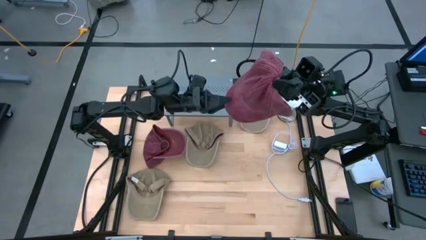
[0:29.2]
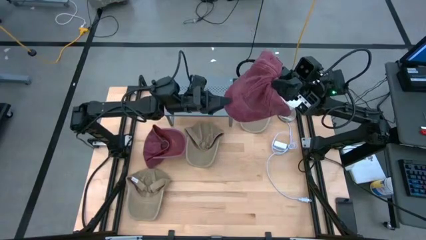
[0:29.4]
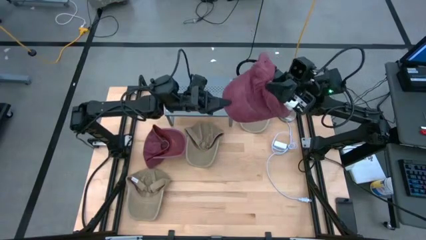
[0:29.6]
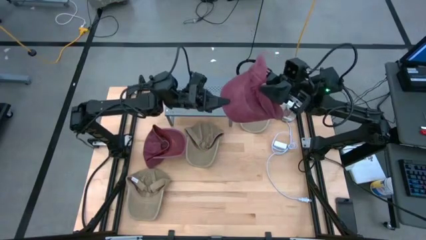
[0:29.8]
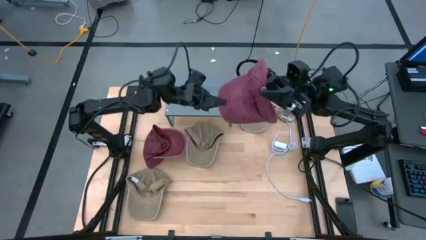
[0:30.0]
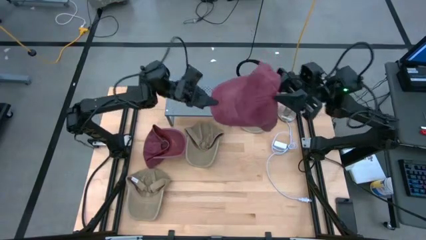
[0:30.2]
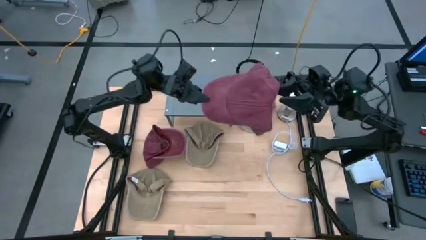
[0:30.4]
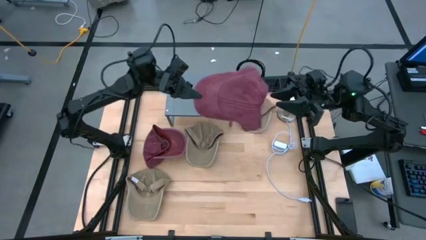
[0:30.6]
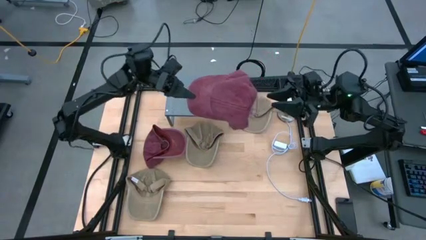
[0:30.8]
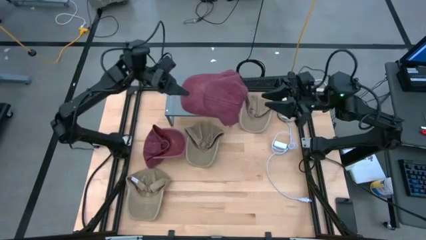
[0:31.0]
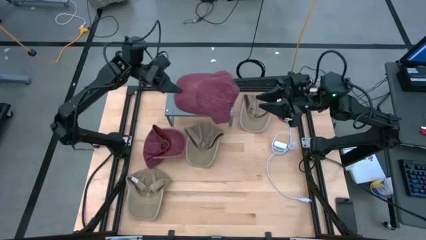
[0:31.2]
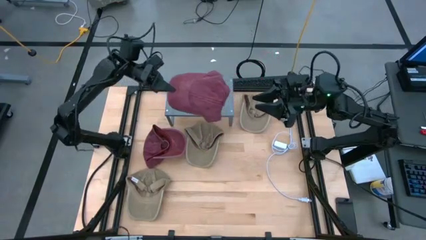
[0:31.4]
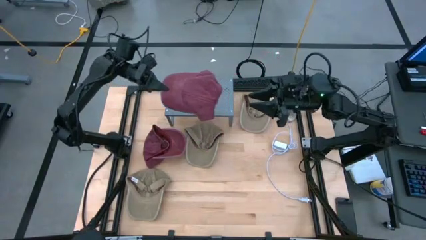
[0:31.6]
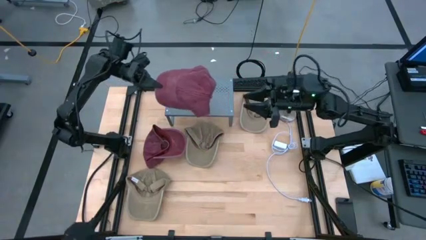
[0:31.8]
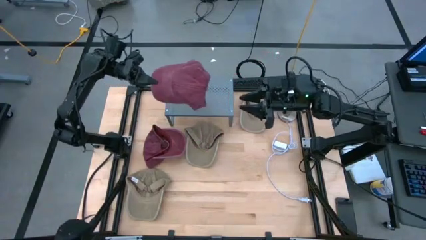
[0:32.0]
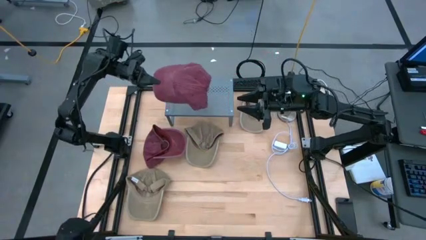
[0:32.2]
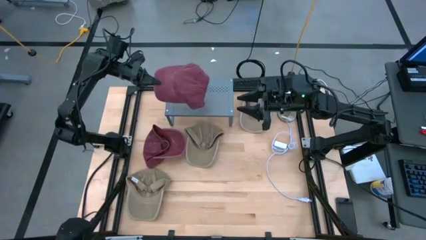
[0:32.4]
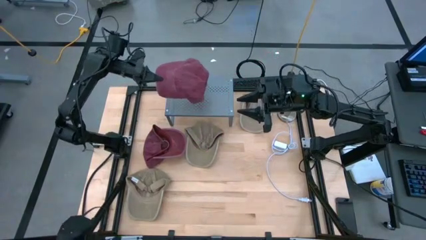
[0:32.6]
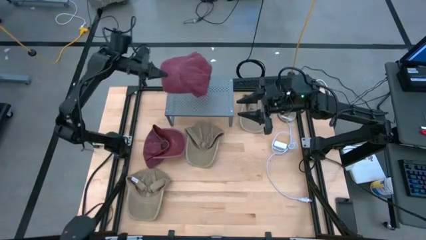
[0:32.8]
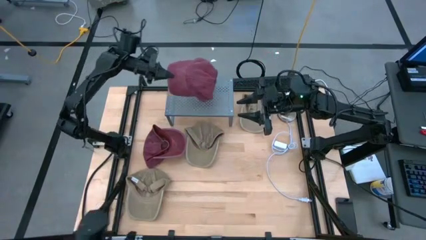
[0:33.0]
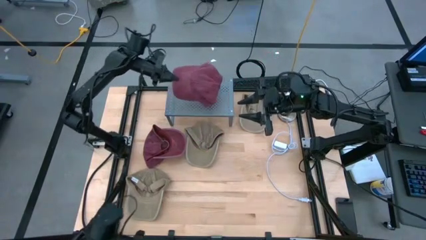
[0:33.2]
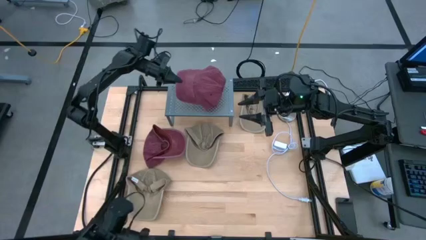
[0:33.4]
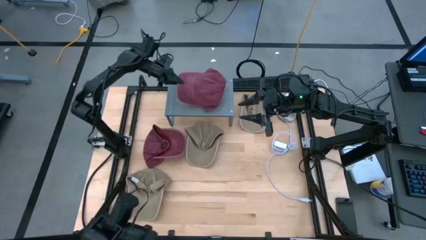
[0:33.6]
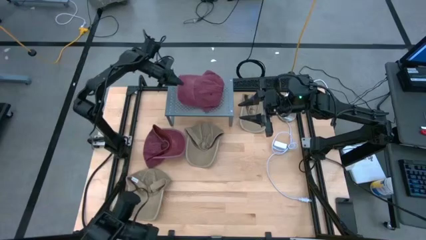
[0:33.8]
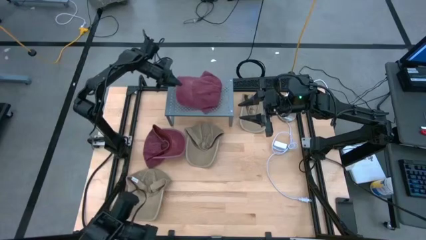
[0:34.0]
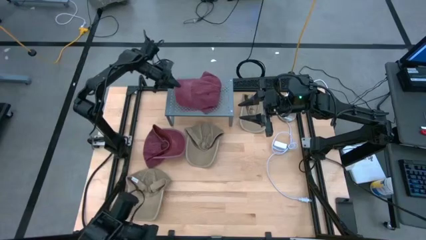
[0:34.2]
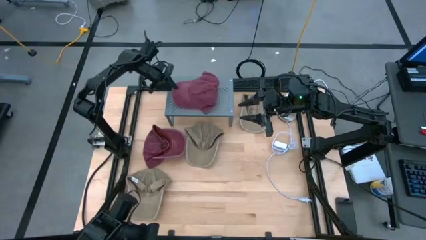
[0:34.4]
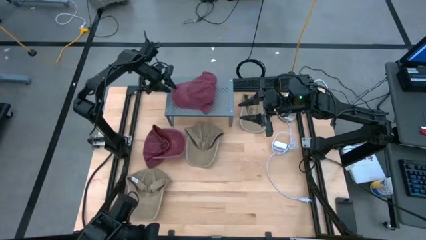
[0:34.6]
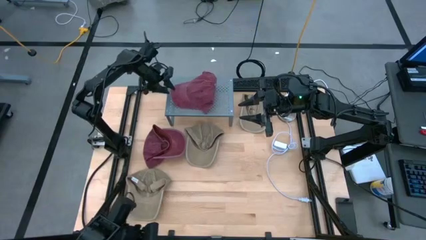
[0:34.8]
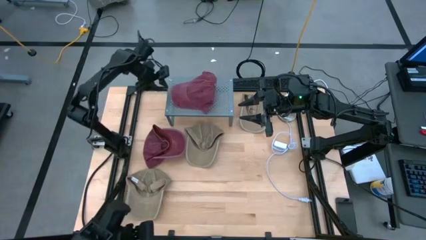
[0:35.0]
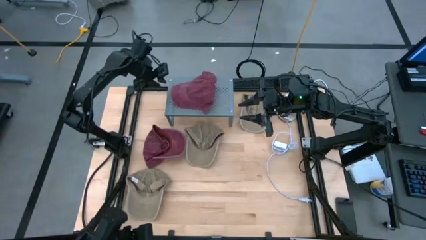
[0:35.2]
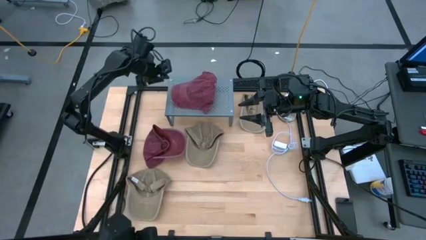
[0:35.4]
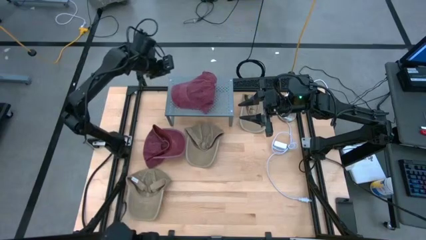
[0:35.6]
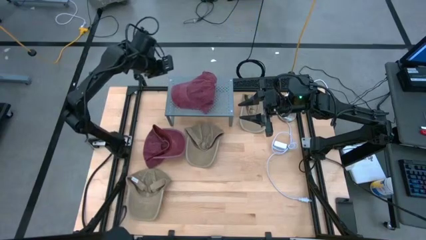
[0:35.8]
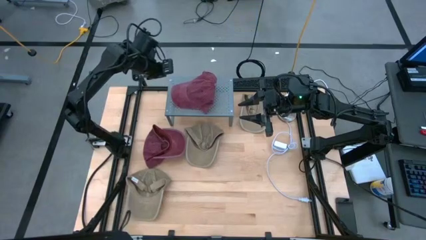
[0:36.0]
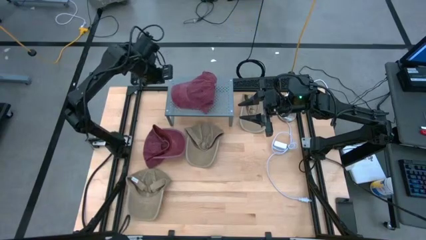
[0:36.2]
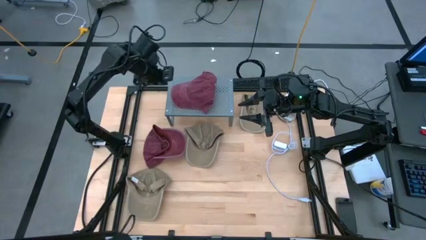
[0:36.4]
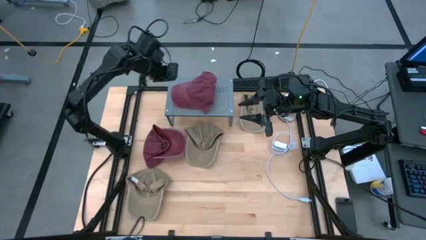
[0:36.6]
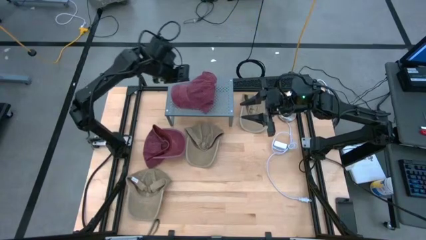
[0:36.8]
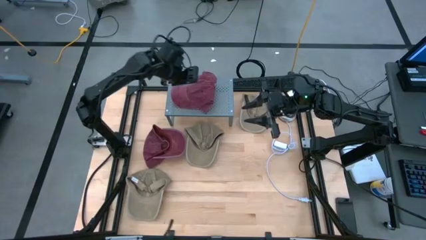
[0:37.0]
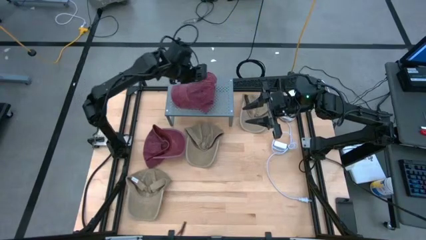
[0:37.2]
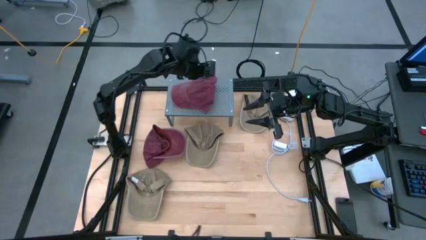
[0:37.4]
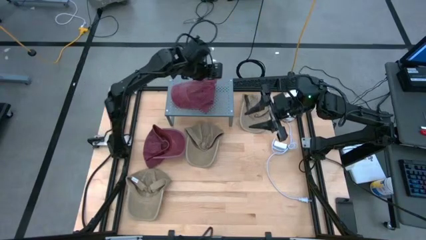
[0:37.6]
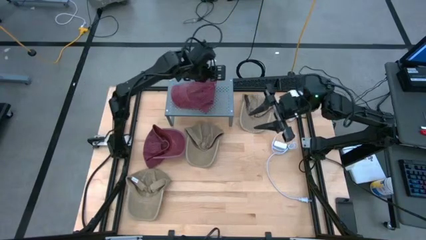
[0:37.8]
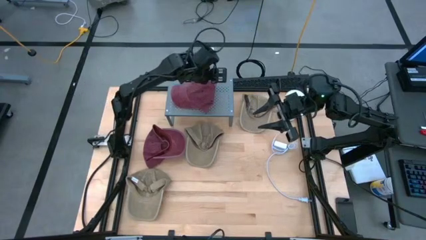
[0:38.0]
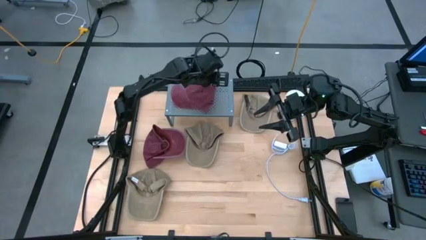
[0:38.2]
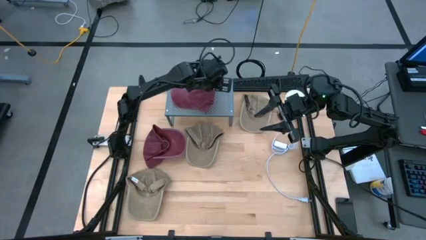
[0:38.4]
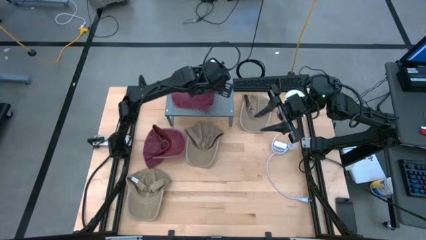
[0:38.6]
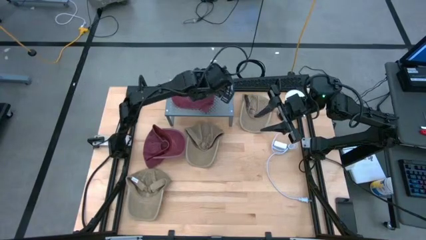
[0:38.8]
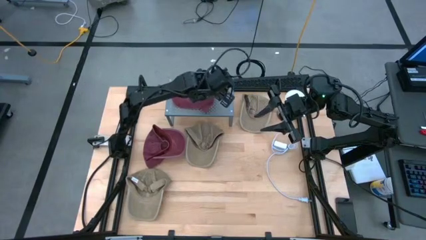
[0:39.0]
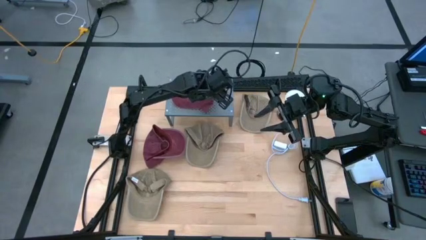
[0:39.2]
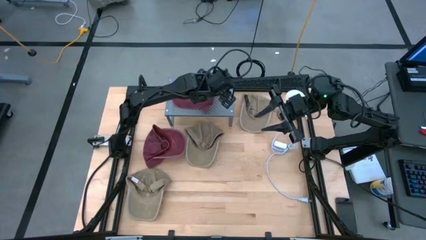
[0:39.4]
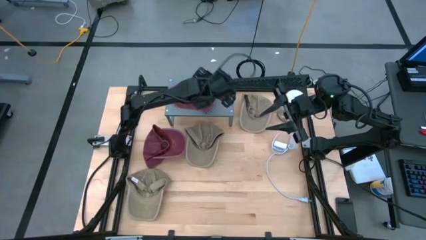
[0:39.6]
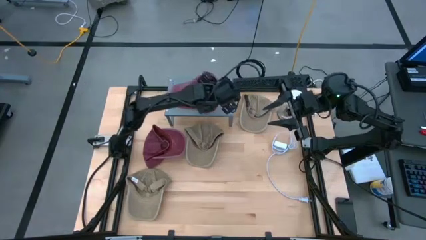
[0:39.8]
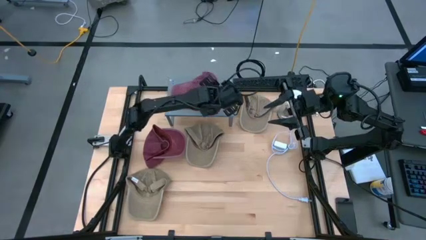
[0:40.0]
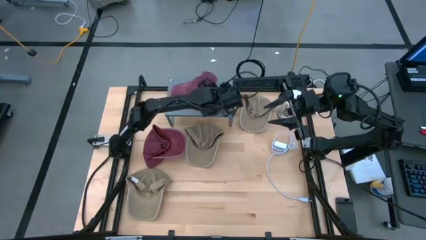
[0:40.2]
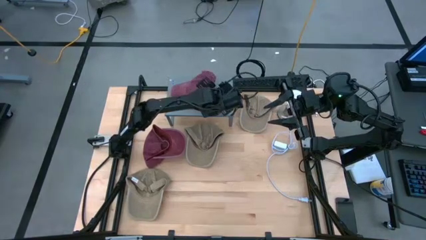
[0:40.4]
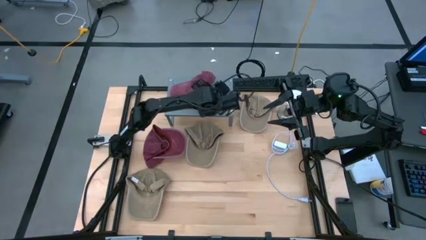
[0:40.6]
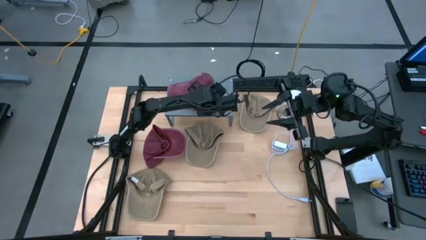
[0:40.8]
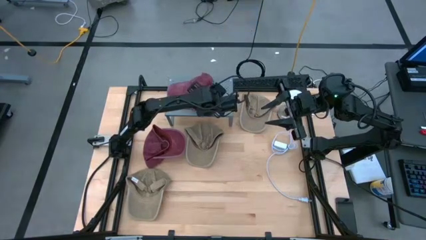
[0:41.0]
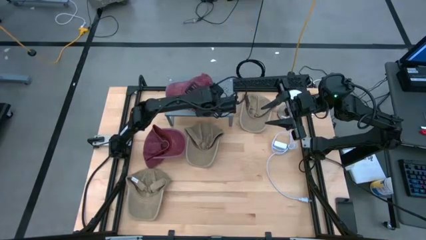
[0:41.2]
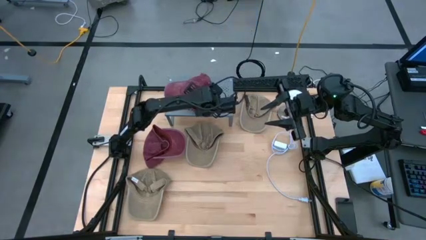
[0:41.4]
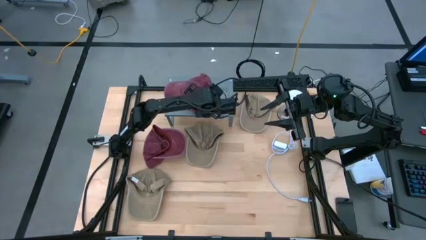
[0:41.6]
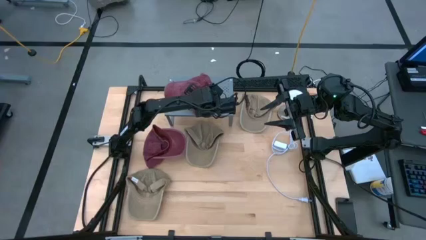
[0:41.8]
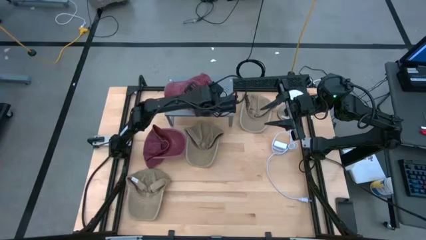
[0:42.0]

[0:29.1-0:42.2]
Task: Pick & Place hat
Put the dark red cap on the shelf
